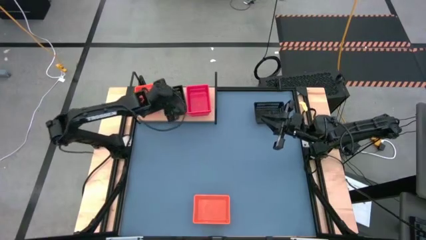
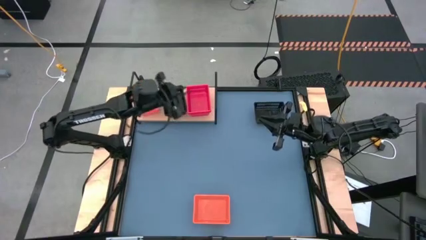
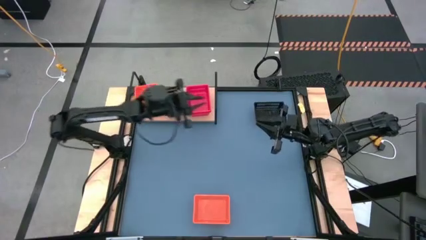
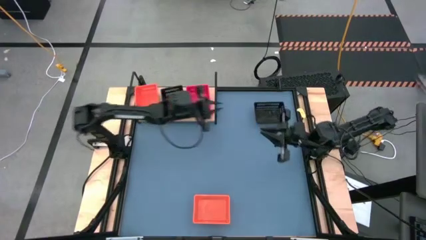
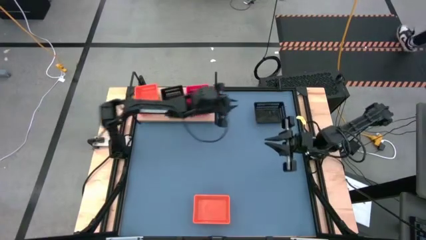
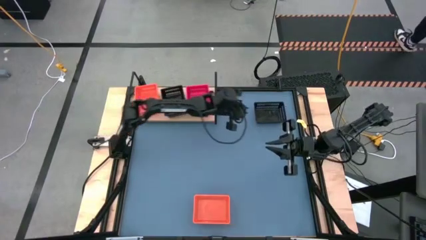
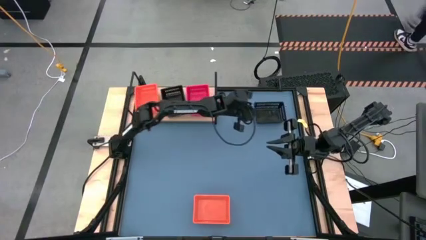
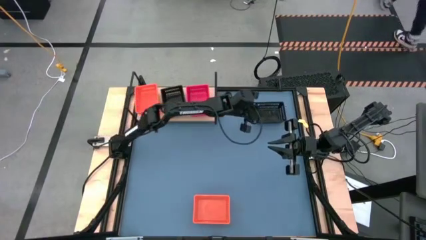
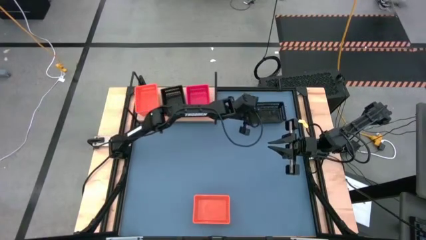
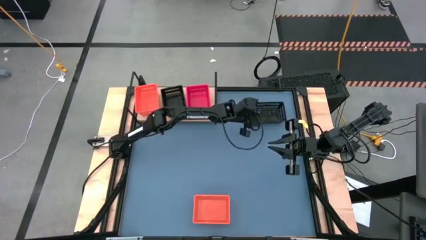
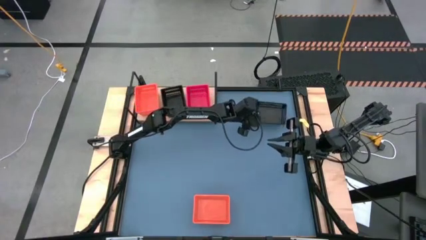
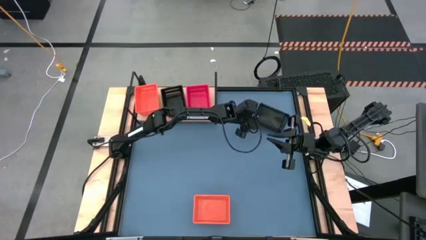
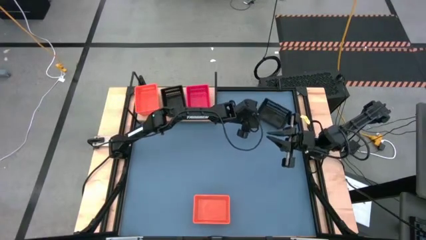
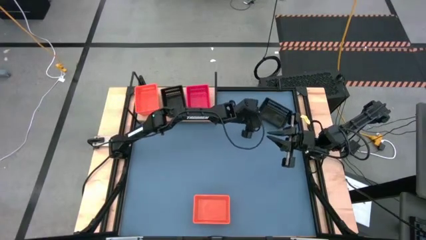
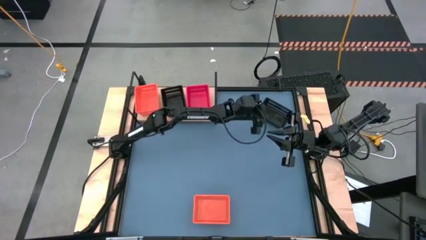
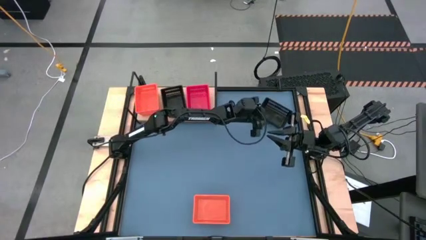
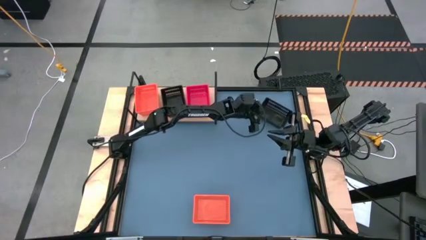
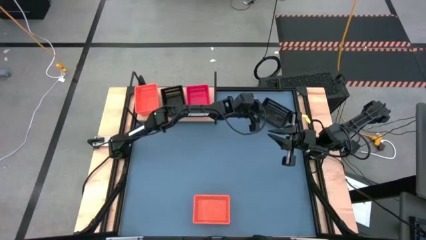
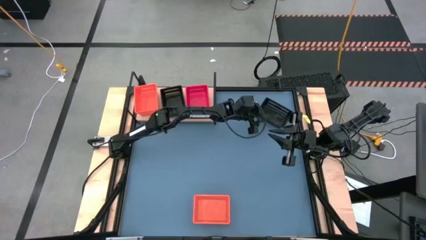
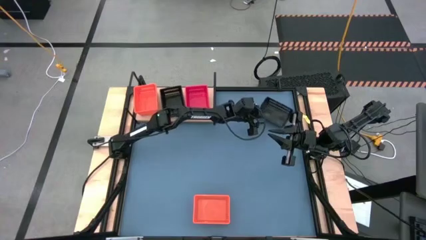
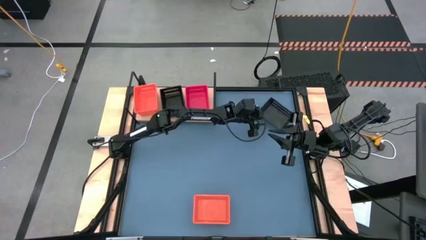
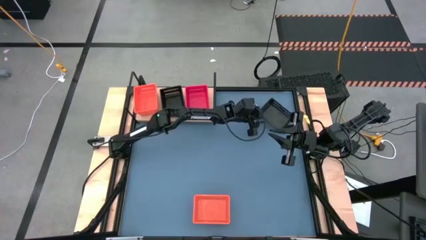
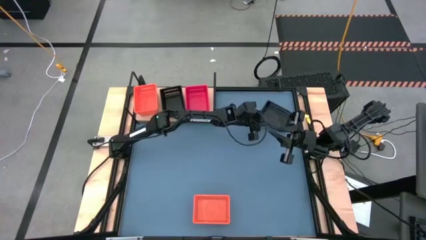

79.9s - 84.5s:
Task: Stack baskets on shelf by color
Stack the black bin on top of the other black bin on the shelf

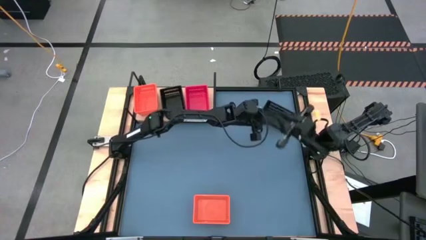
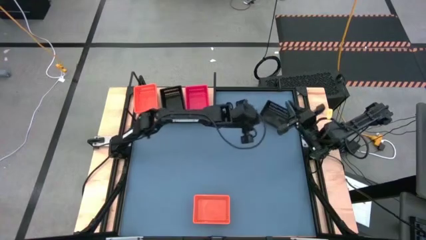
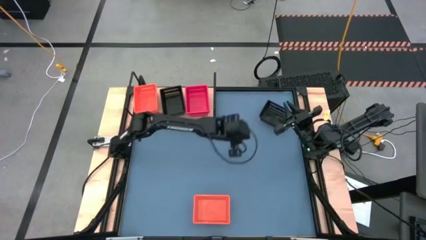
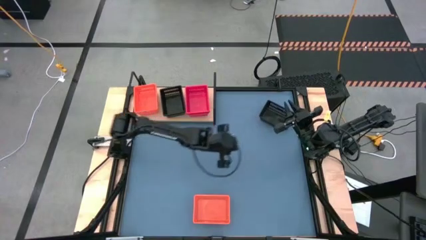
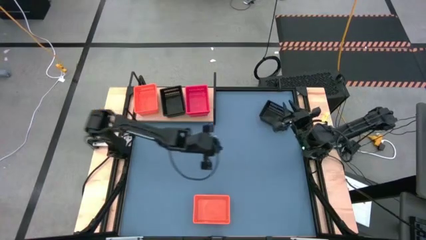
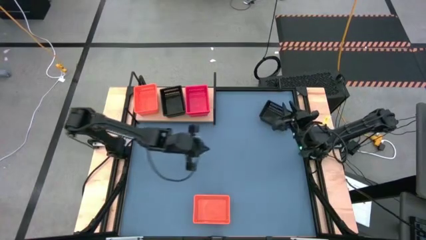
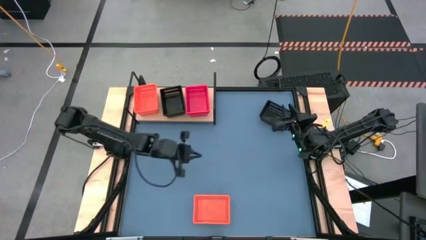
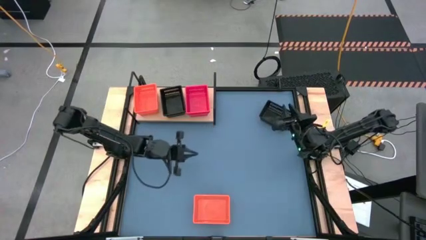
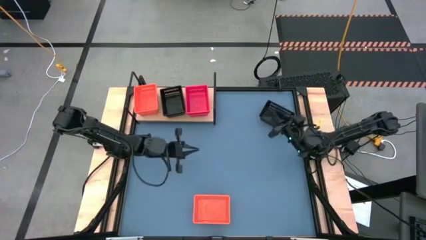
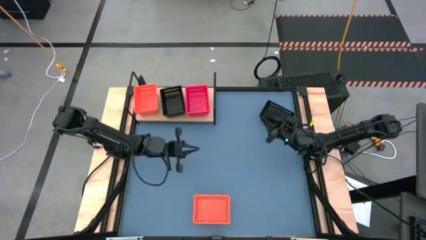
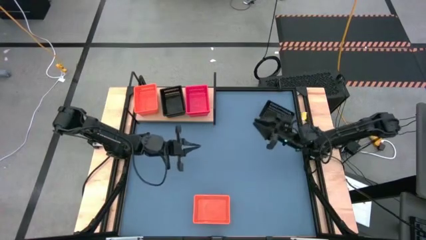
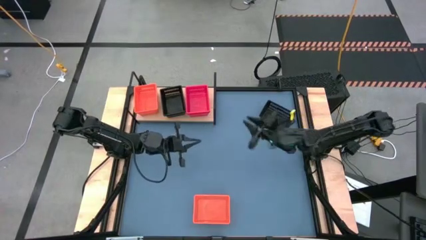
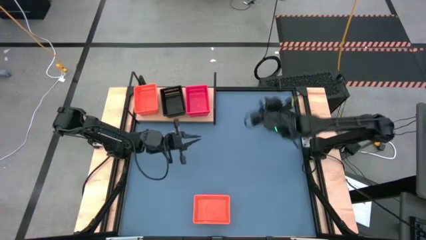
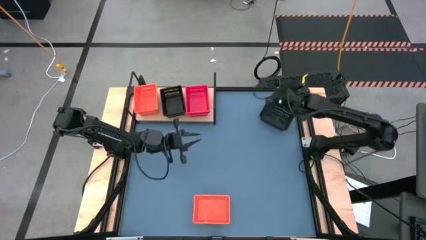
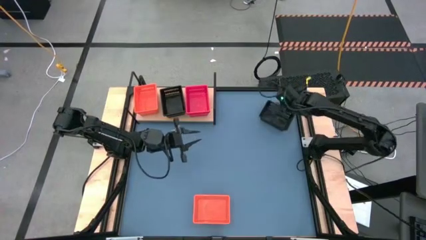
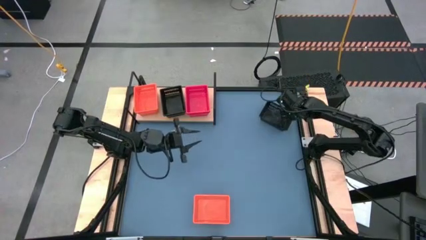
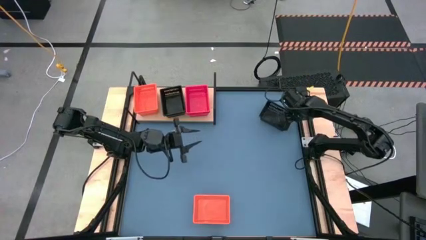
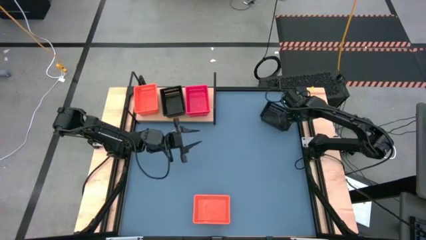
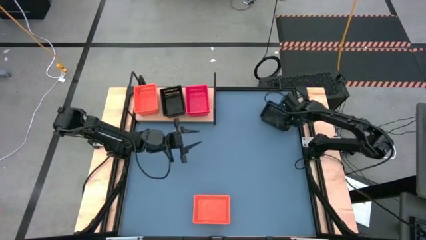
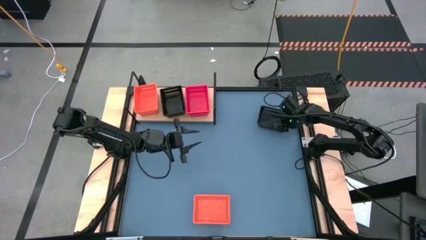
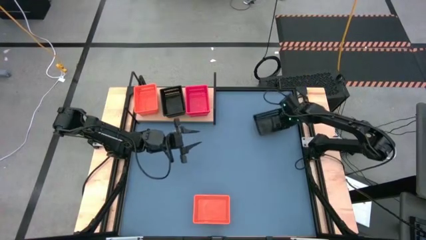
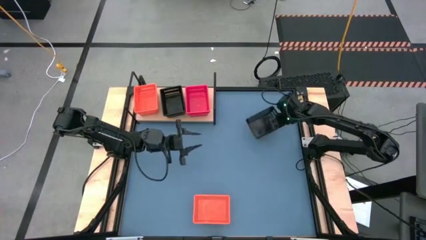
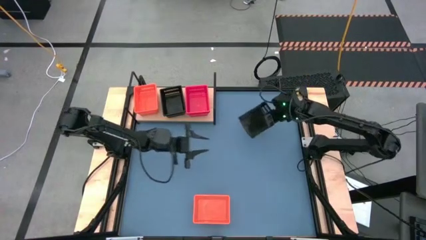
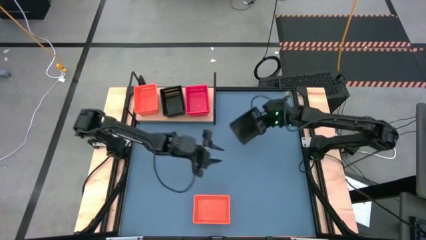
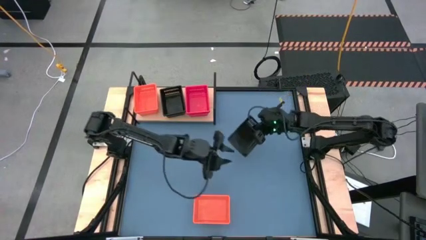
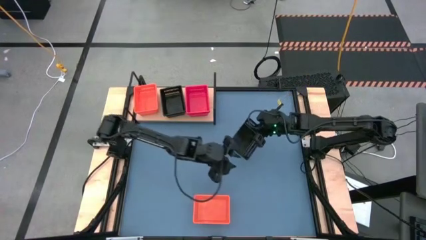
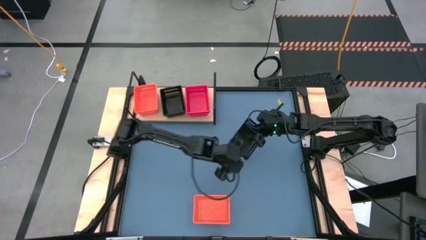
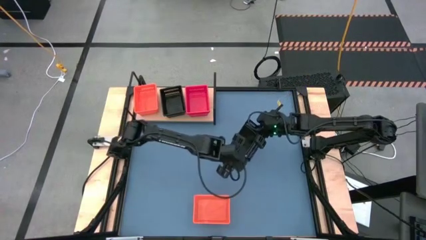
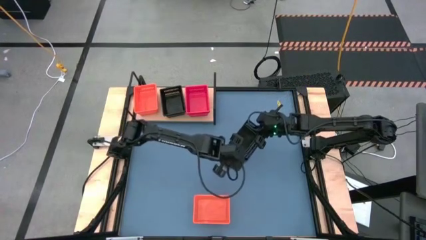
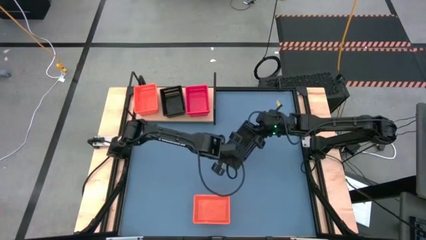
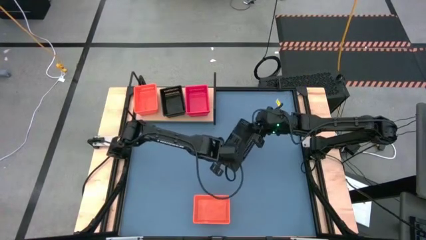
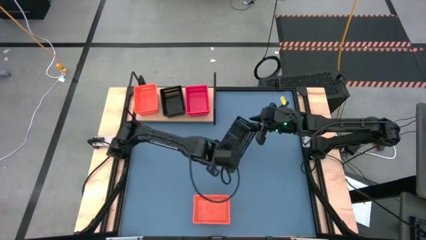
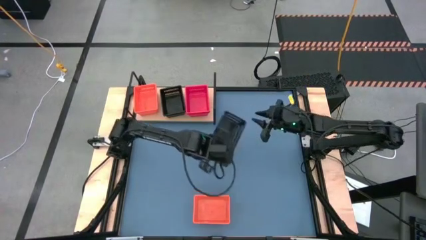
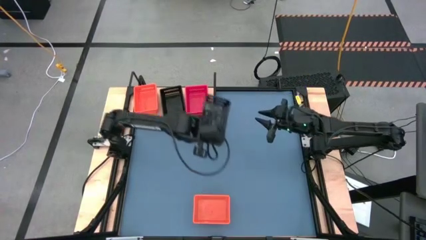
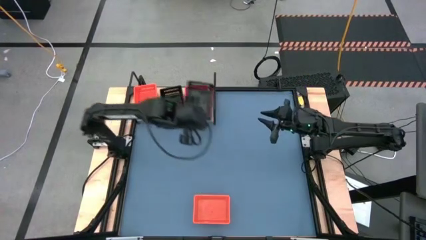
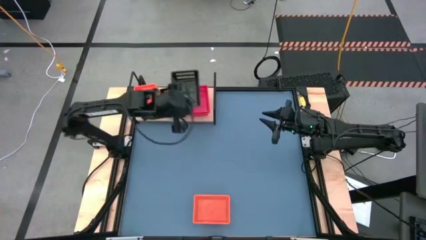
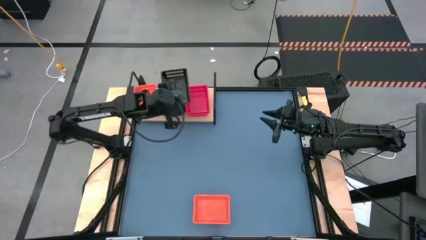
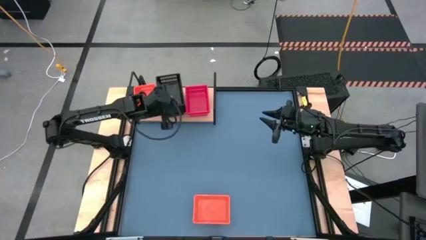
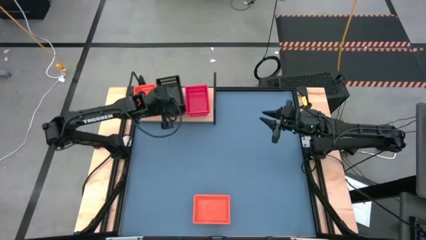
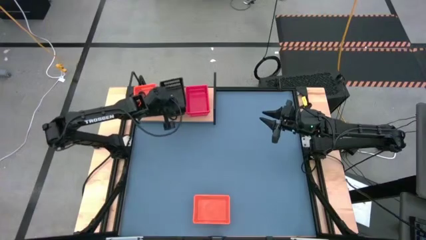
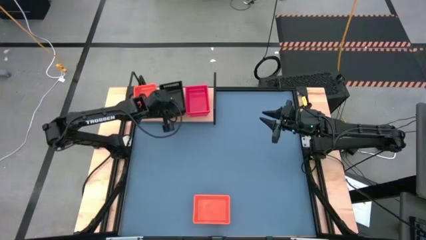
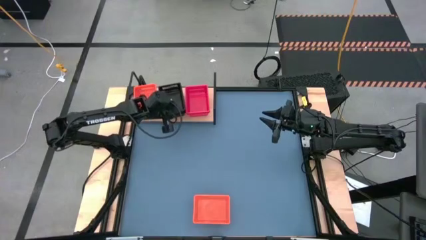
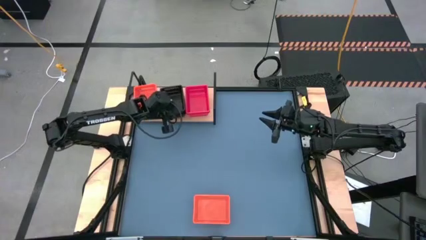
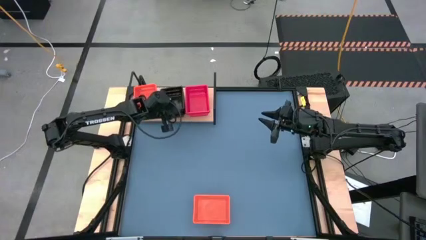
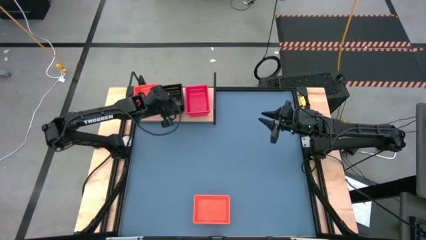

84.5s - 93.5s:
Stack the black bin on top of the other black bin on the shelf

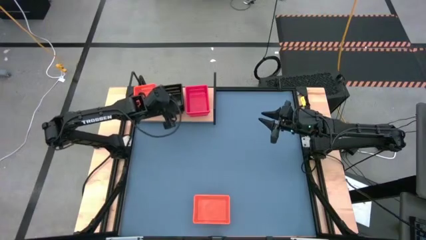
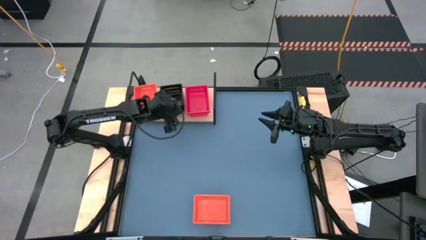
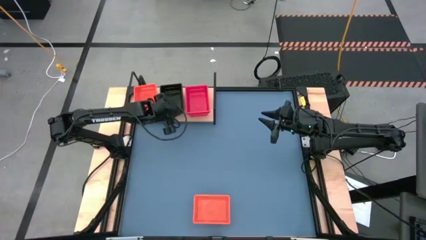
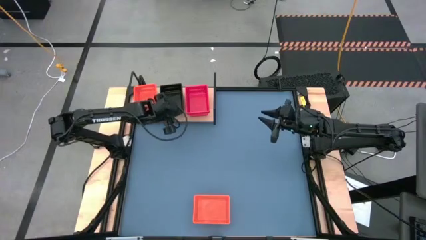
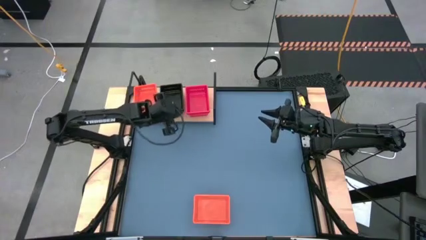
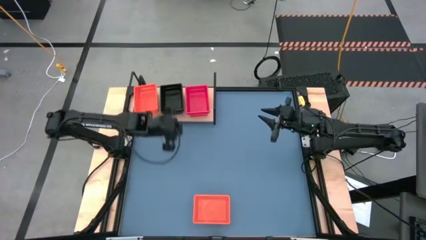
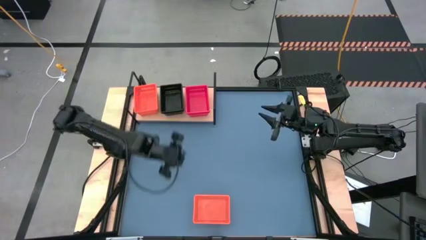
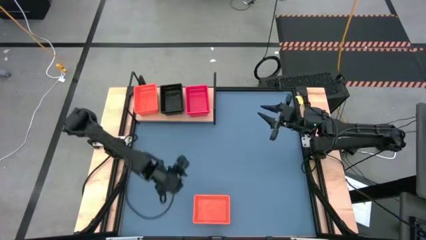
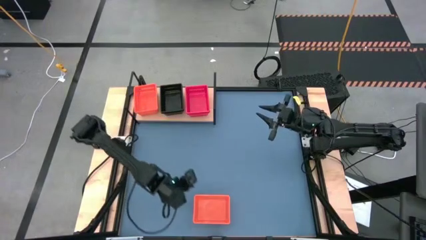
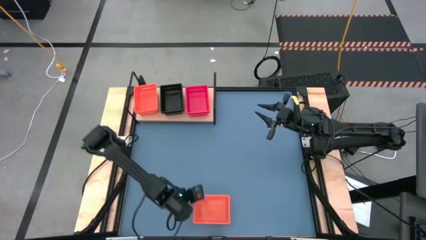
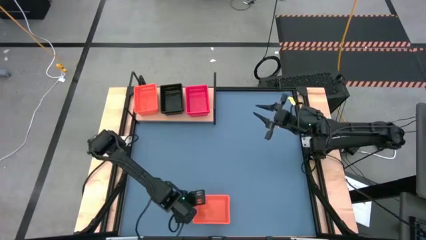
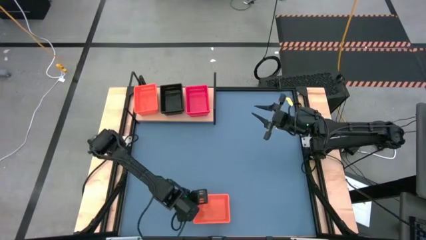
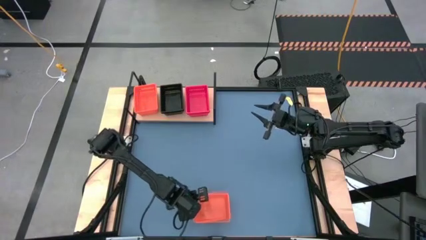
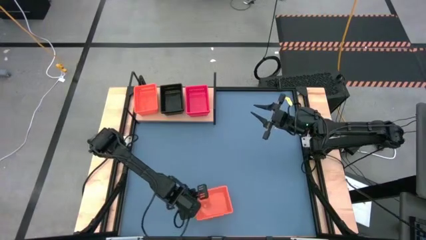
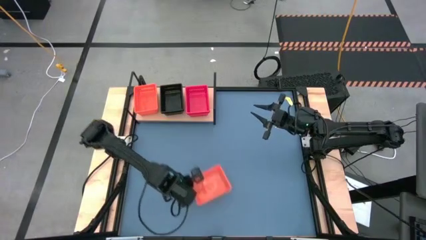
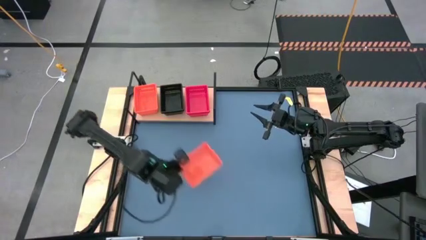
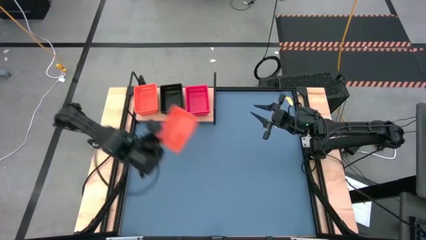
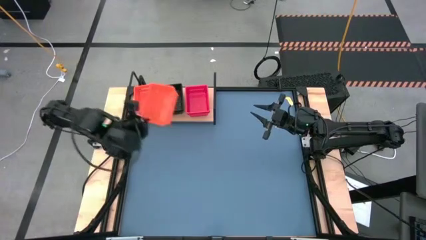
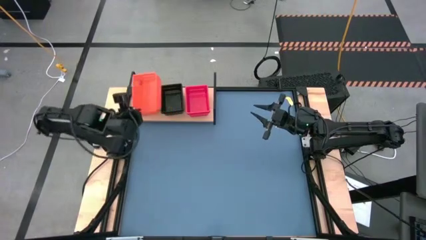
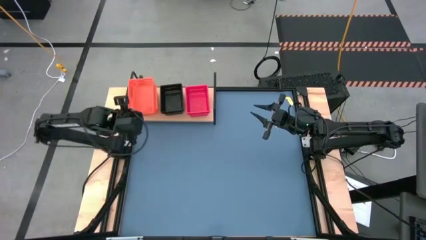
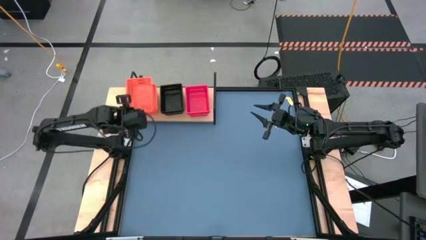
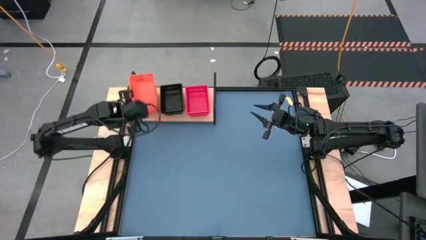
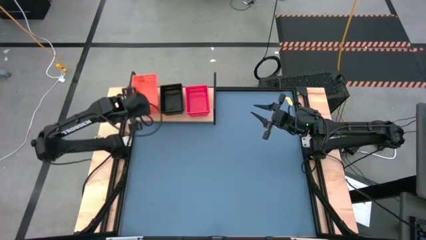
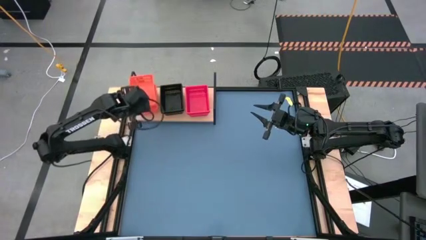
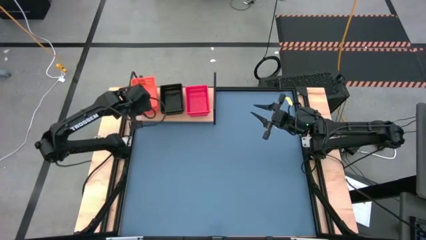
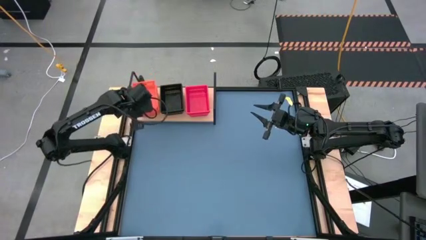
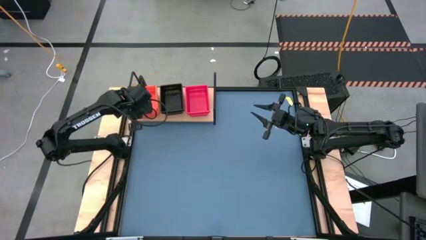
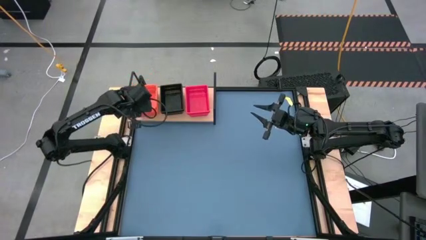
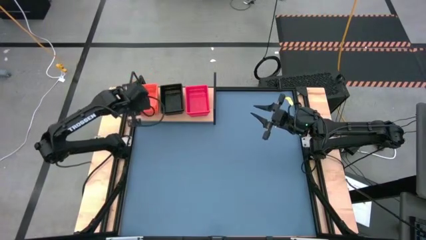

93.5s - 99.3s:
Stack the orange bin on top of the other orange bin on the shelf
